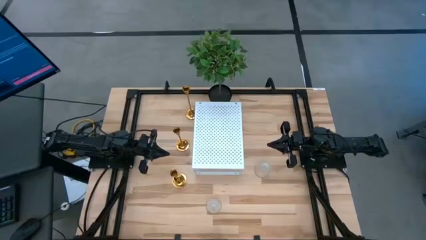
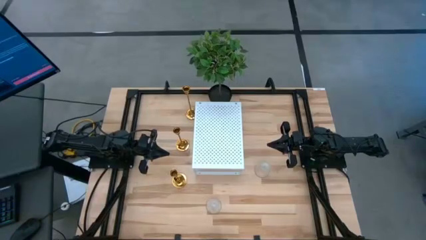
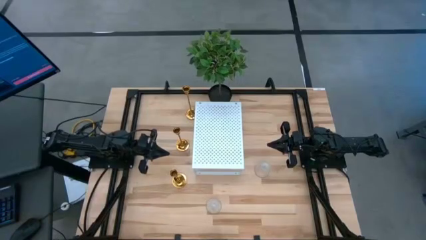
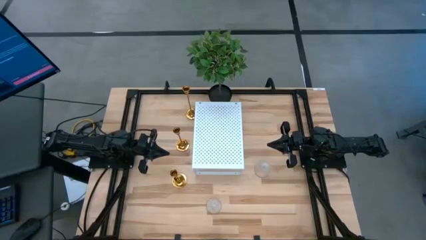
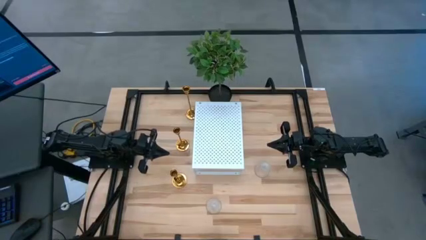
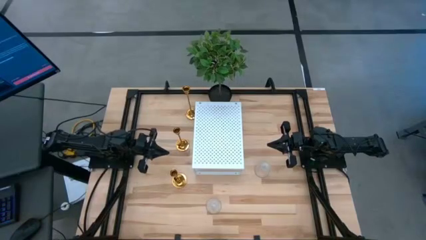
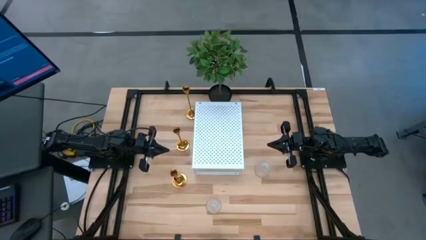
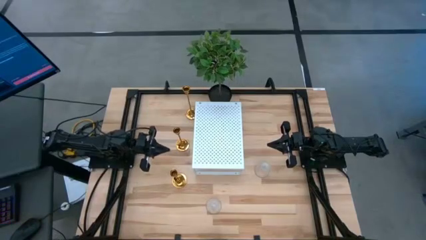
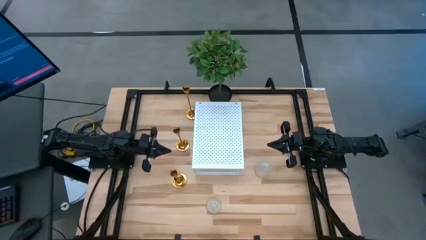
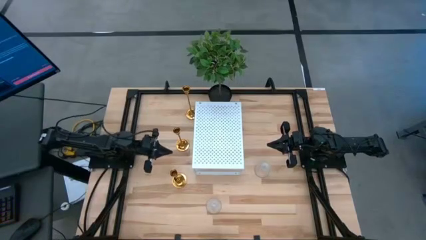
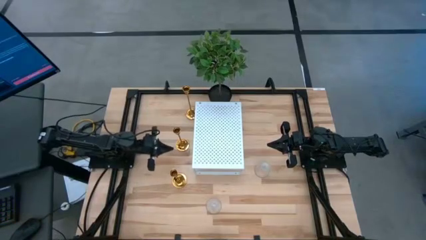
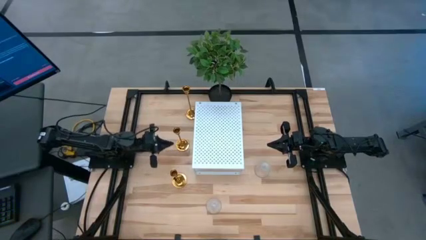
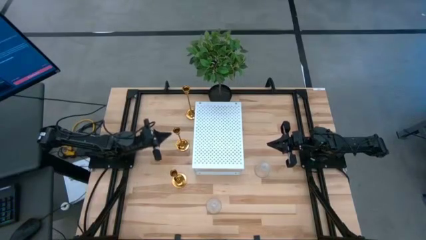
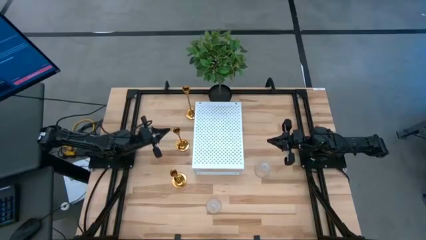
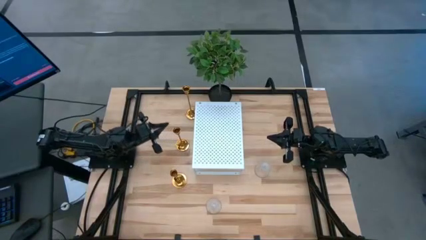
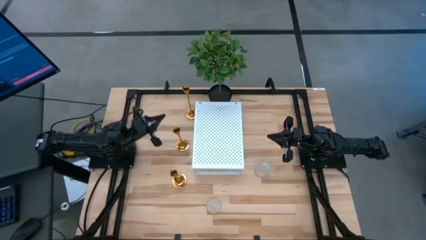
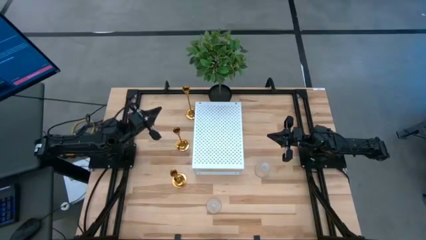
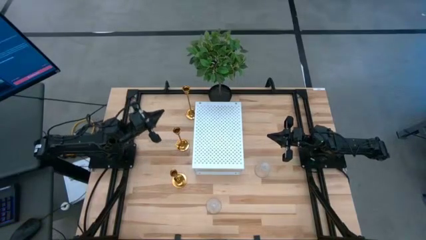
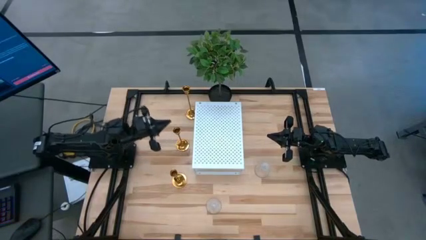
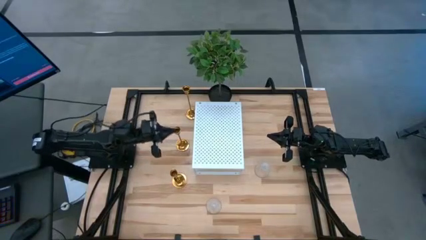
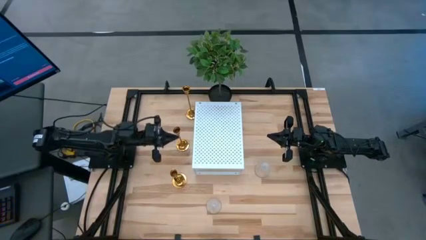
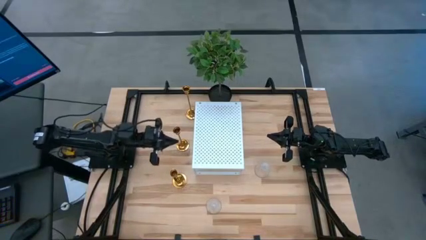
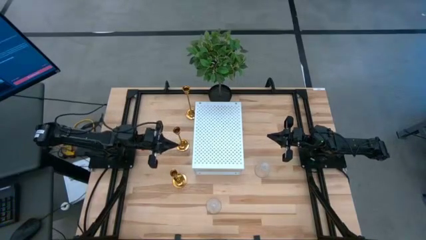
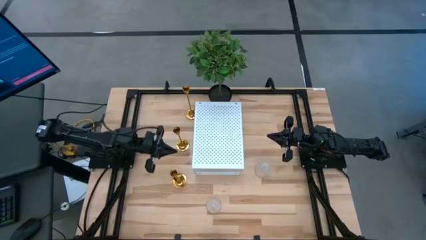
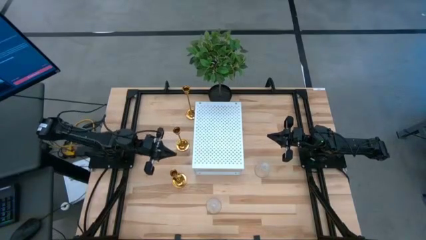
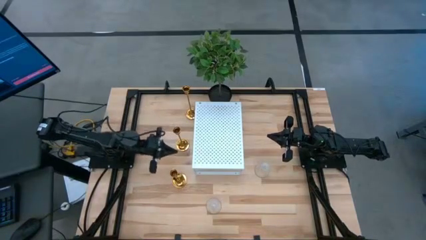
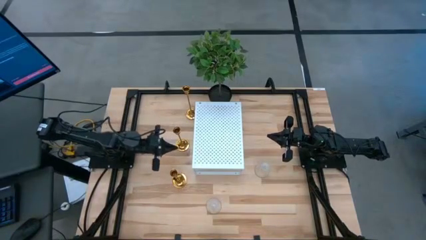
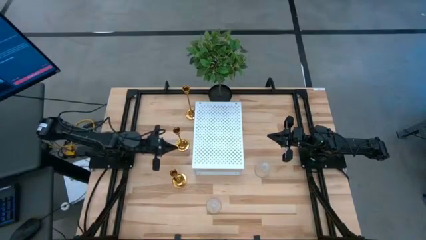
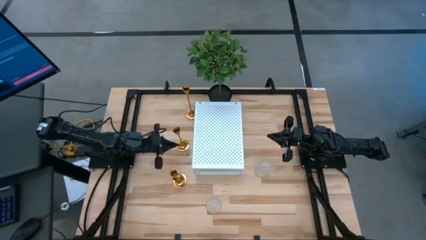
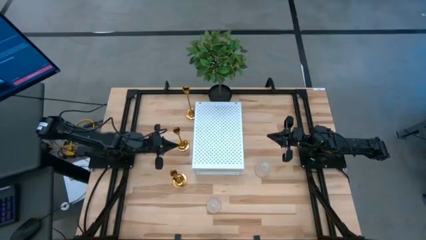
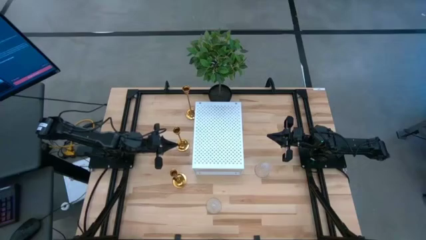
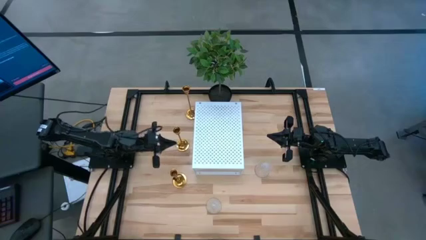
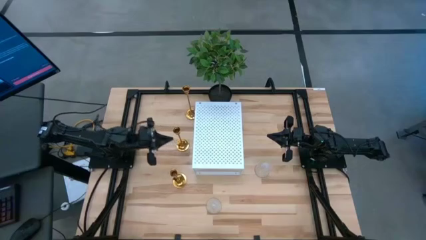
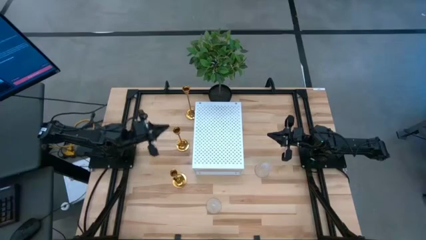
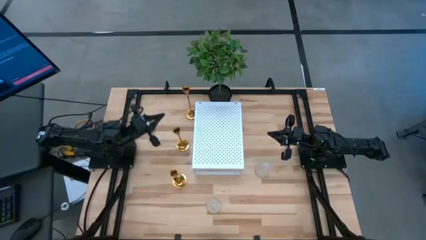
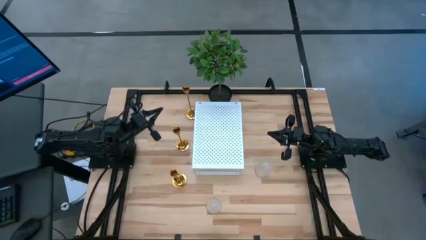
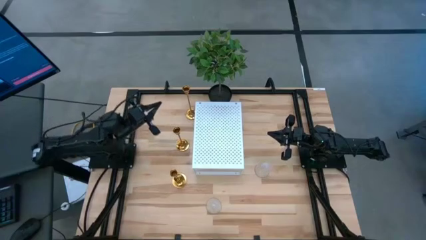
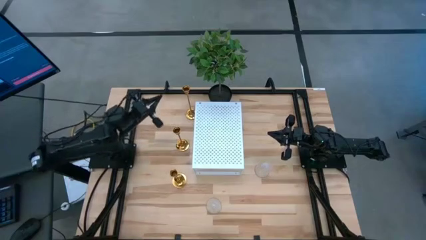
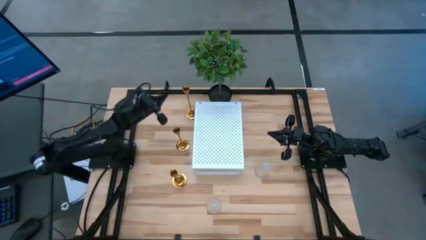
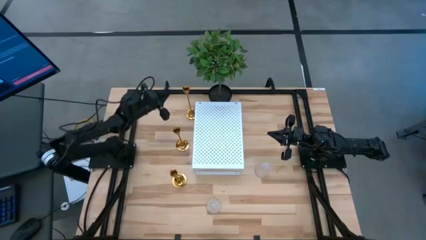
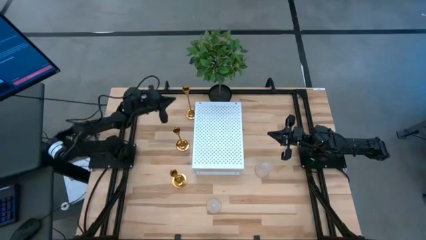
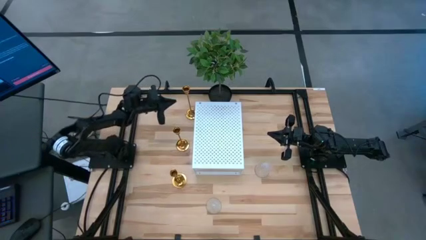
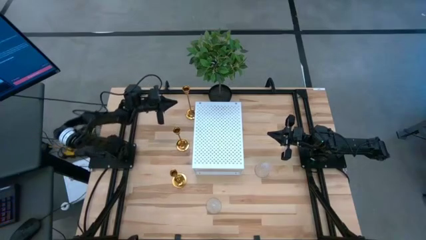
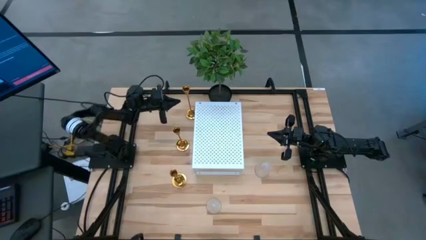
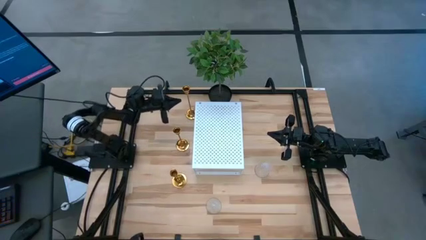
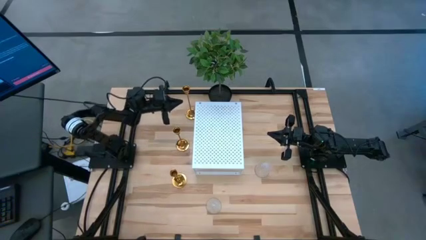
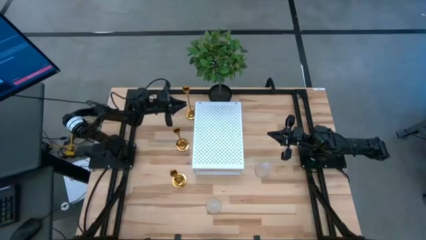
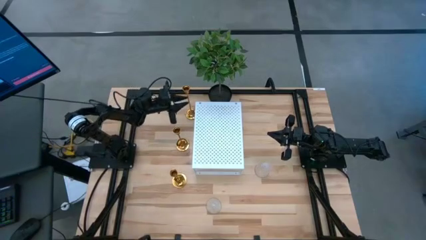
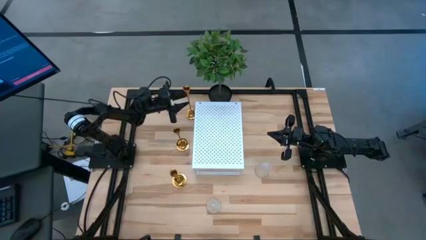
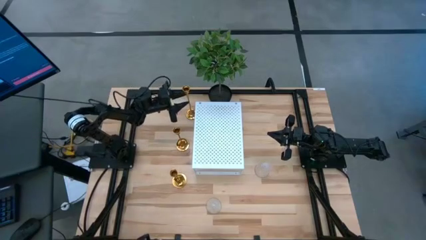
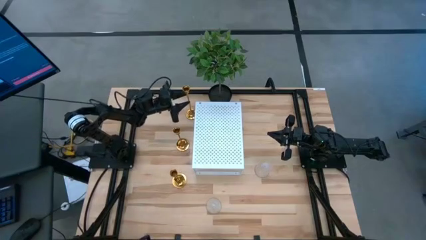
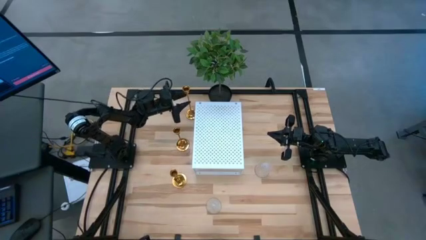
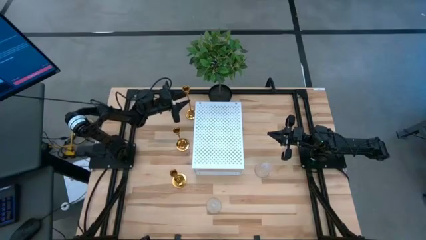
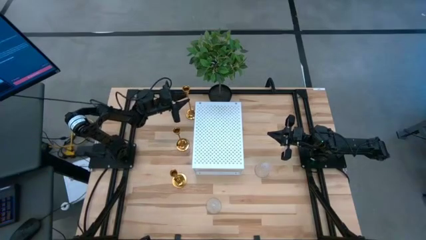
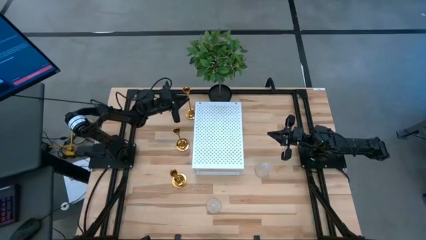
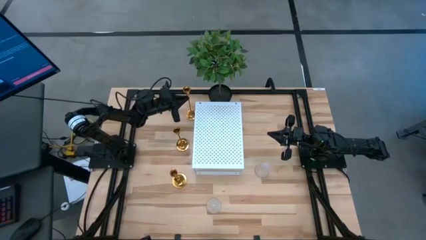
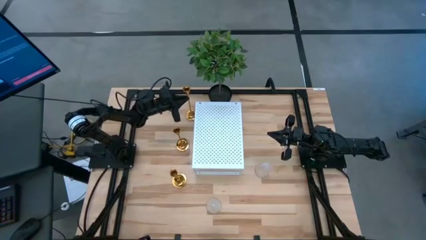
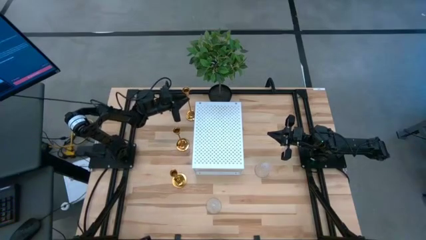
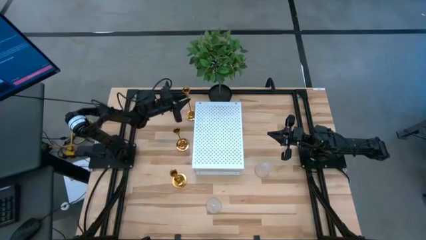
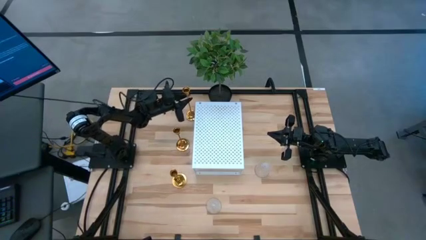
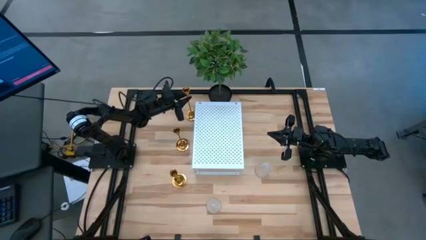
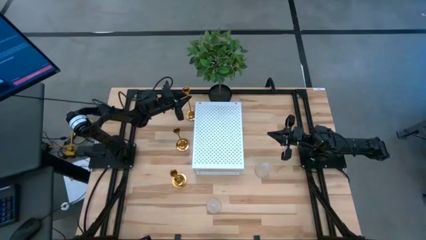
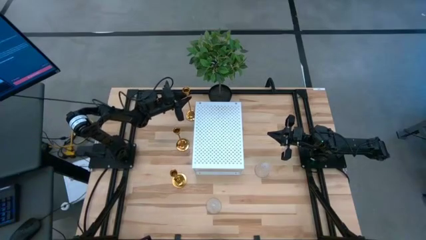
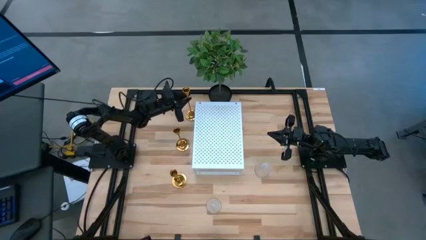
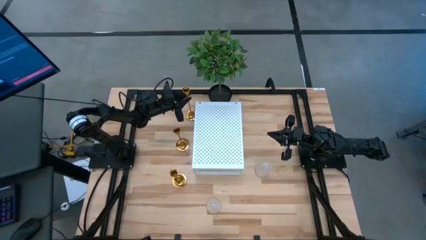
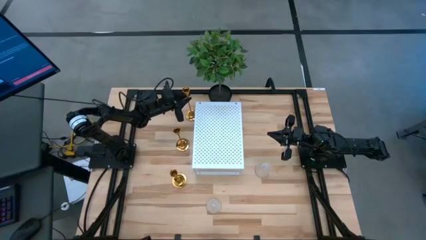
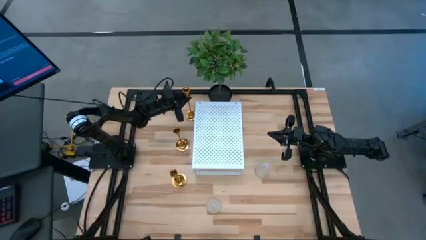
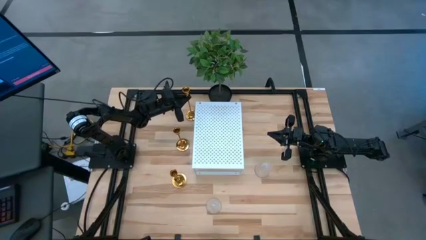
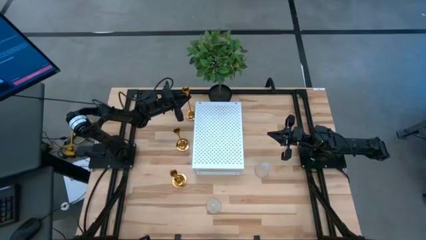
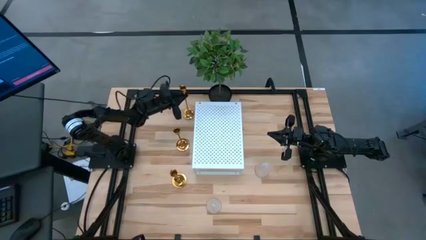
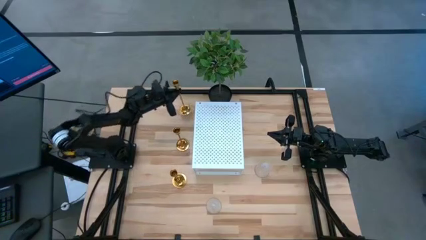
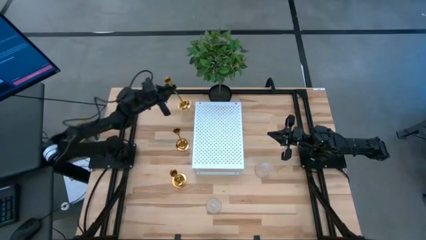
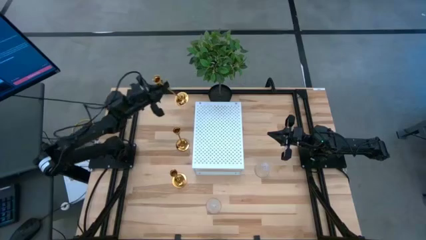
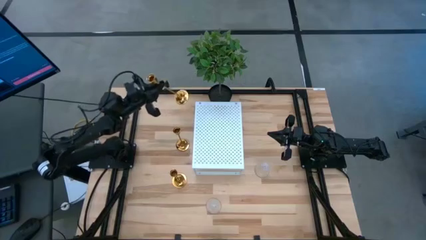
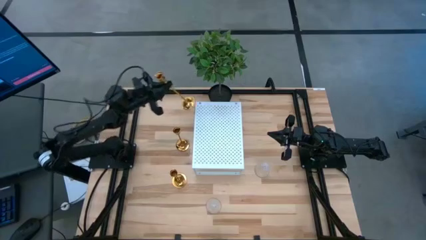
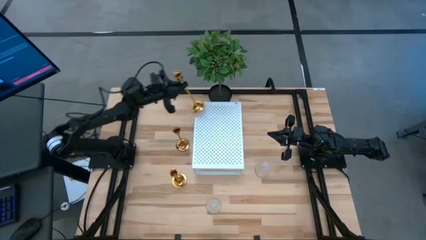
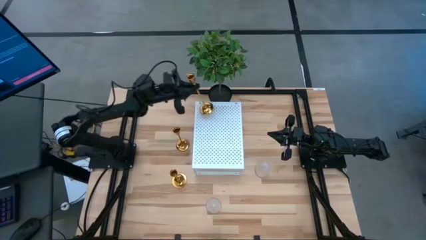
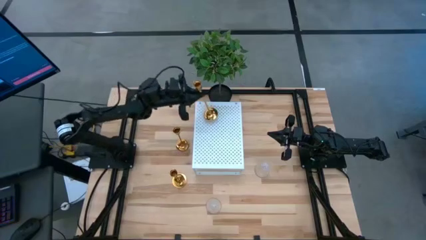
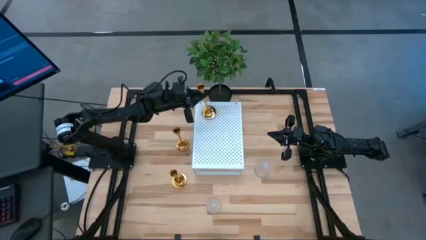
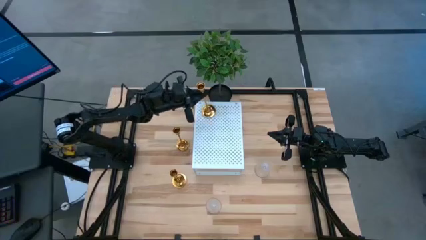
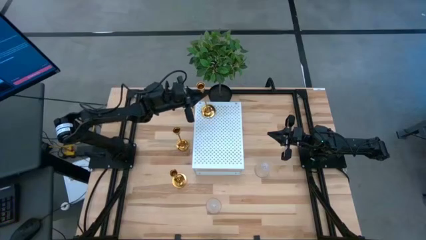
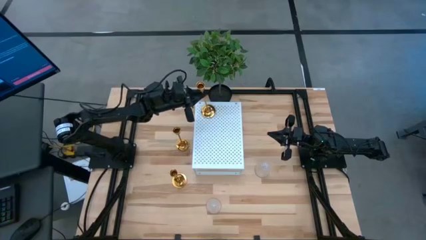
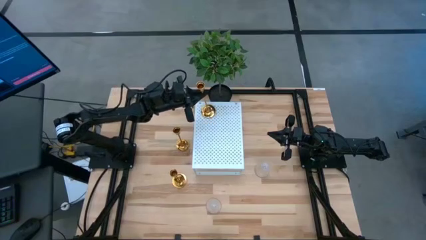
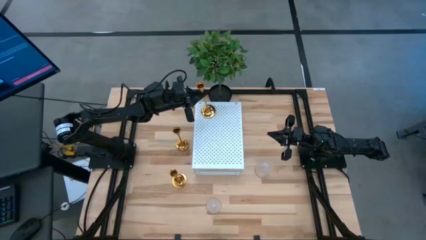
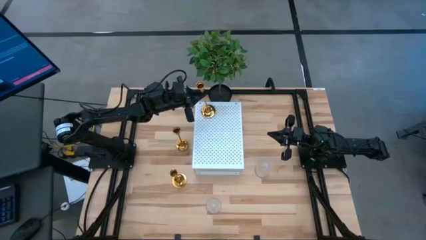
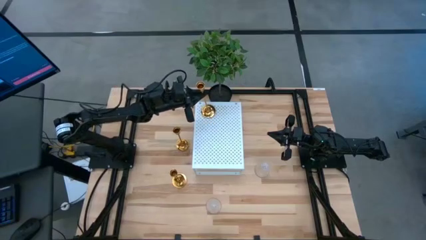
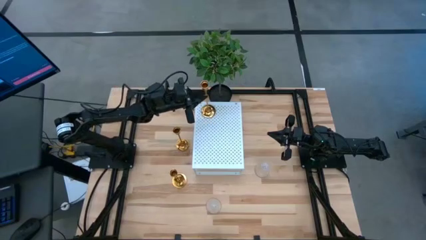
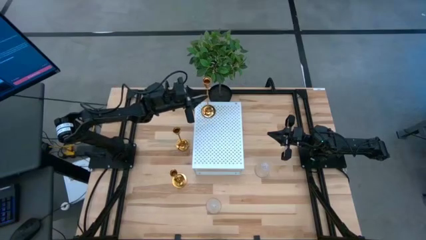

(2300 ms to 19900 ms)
Task: Pick & Place candle stick holders
Put the top gold candle holder on the shelf
